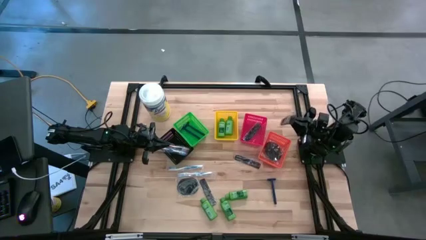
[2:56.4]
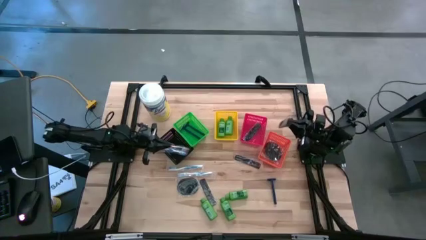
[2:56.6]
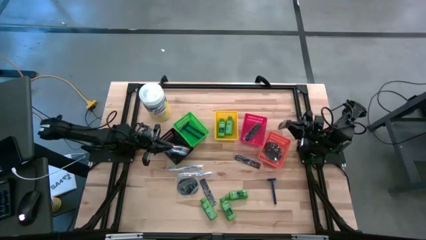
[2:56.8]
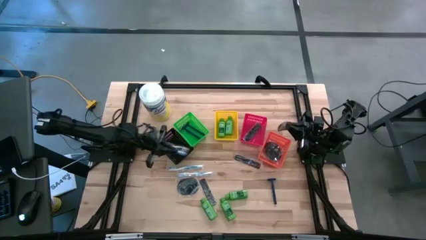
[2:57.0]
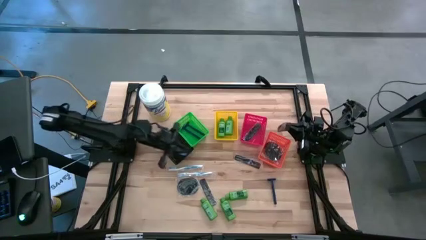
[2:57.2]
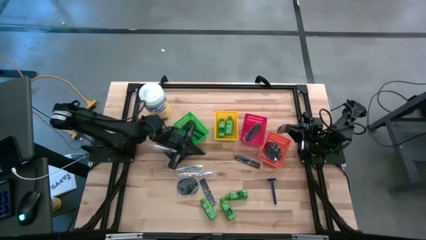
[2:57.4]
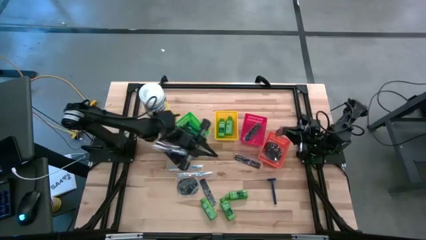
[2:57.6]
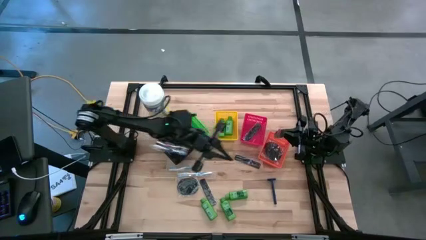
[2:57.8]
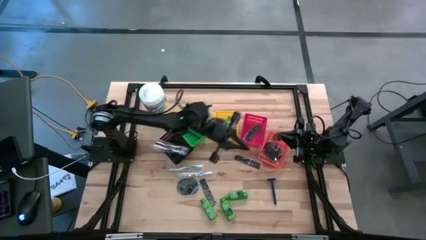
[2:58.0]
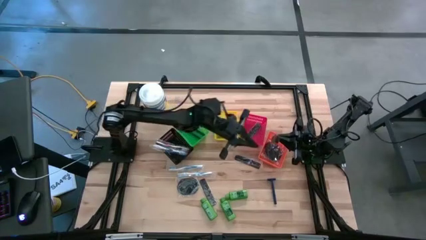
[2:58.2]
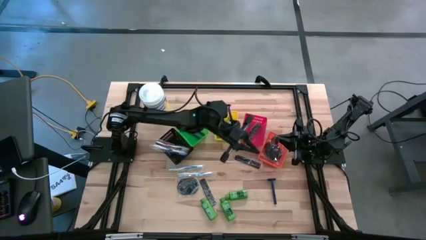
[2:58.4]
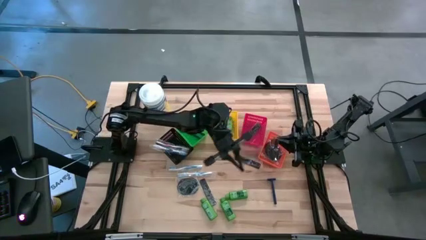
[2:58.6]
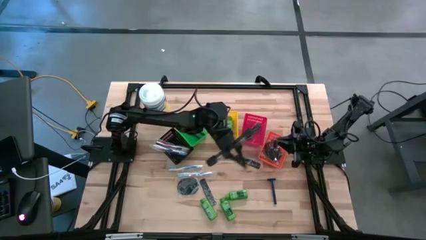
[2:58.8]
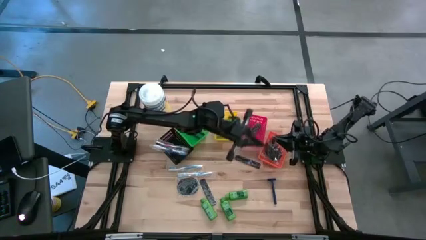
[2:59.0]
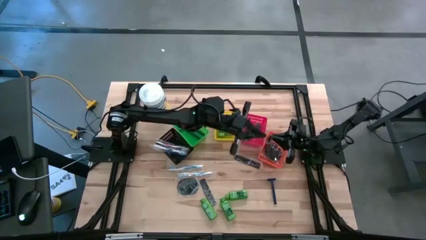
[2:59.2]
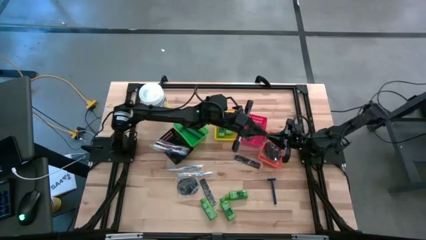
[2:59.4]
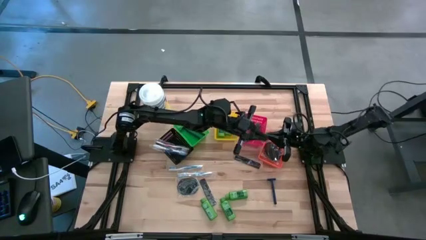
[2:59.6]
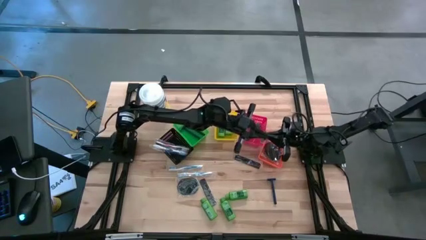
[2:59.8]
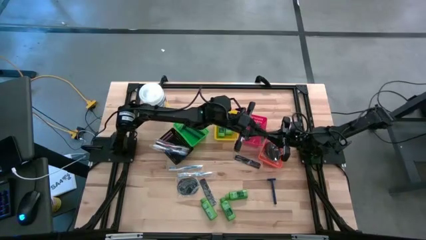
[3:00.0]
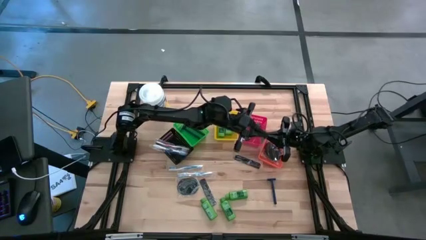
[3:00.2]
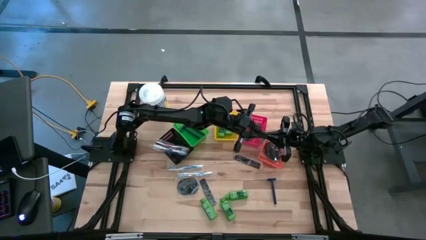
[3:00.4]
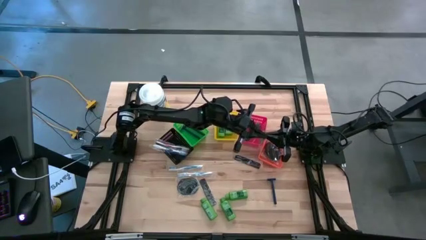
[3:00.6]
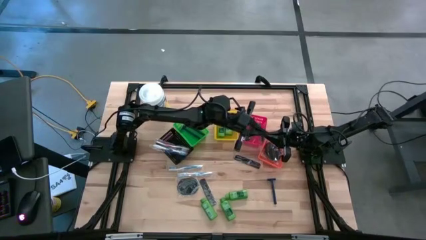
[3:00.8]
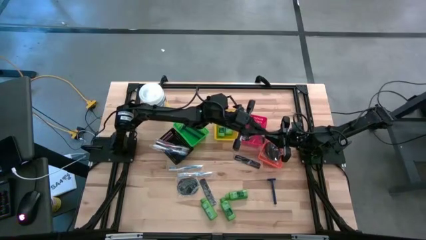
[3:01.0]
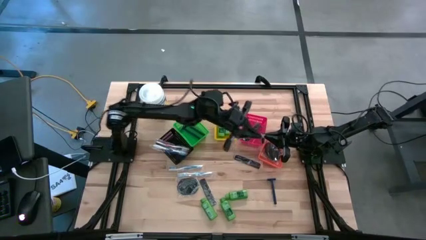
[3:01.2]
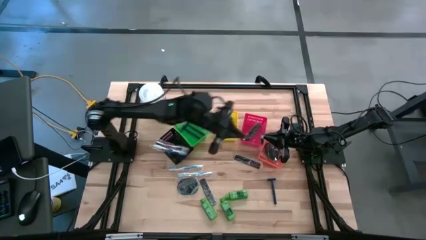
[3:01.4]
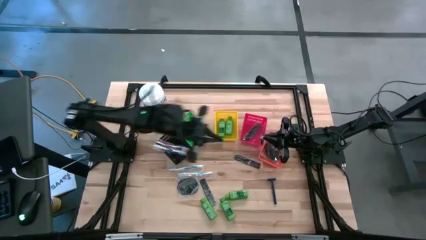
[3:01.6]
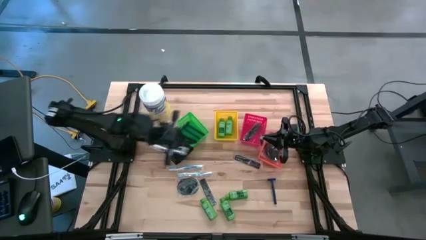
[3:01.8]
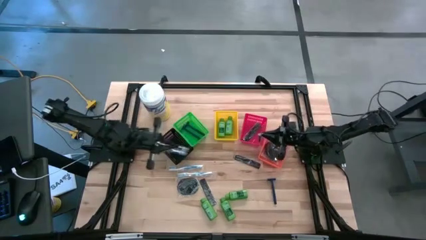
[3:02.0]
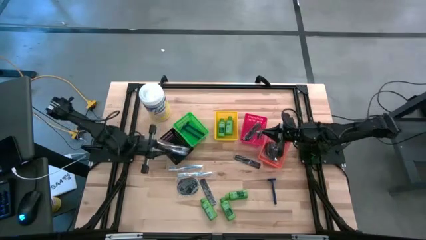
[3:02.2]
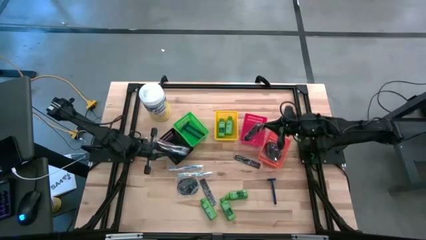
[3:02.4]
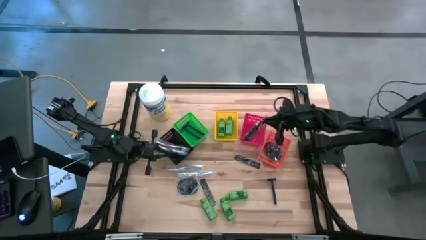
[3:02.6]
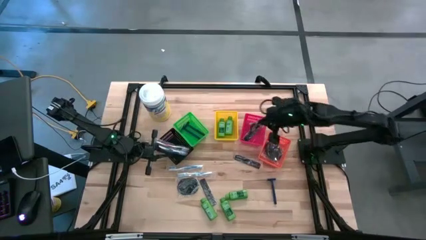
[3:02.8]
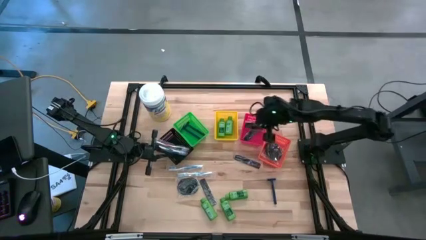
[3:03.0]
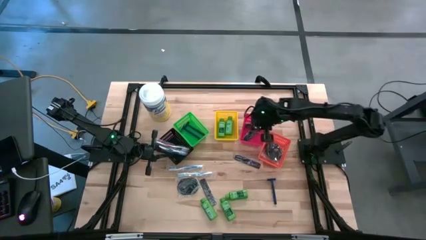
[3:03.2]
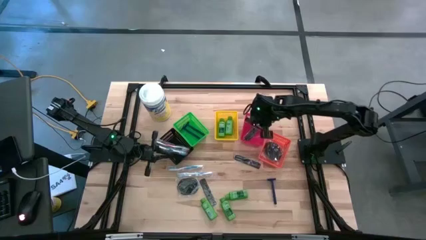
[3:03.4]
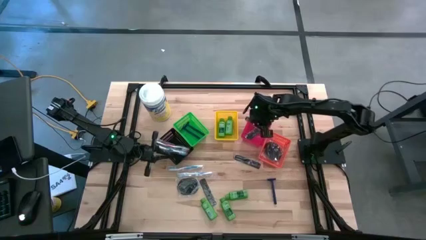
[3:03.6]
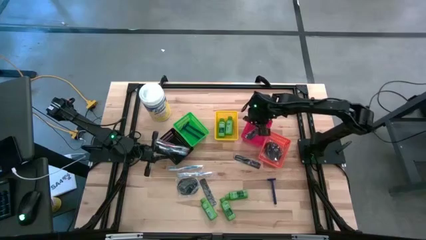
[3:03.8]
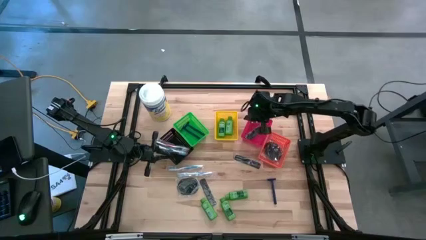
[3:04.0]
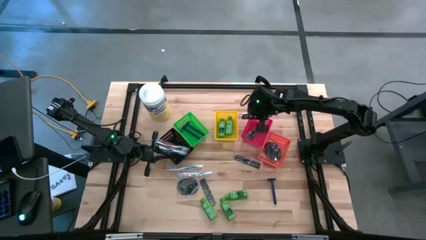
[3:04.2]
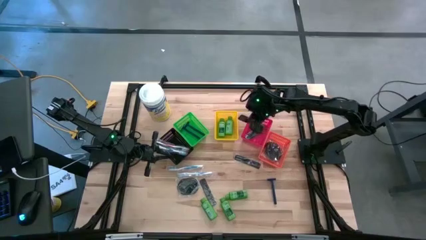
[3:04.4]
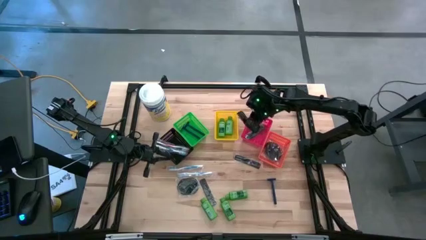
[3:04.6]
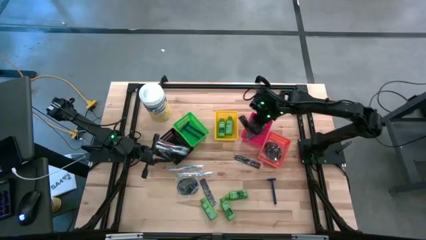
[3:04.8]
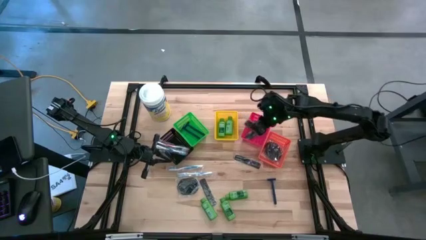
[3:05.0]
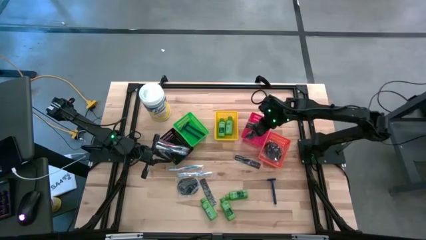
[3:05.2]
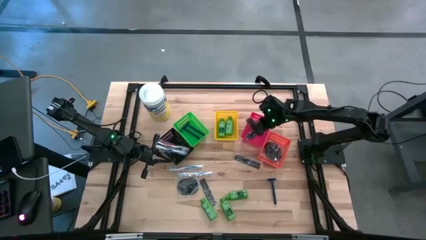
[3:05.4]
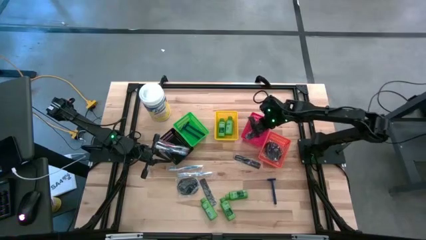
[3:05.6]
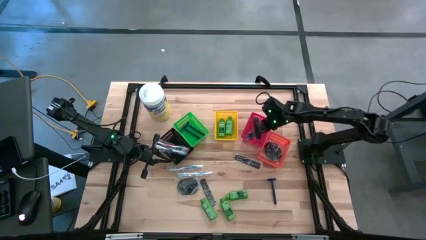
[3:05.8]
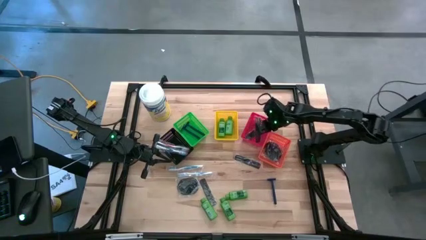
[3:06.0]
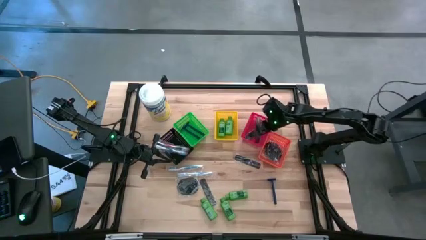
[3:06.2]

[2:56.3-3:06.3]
Task: Pick & Place Travel size toiletries
Put the bottom black hair comb into the red bin

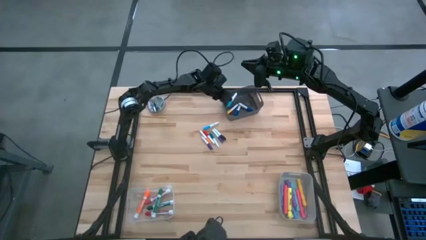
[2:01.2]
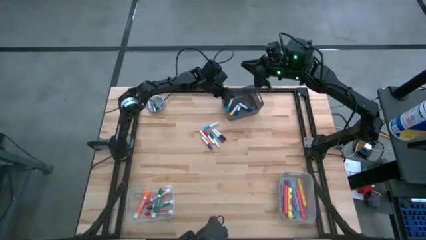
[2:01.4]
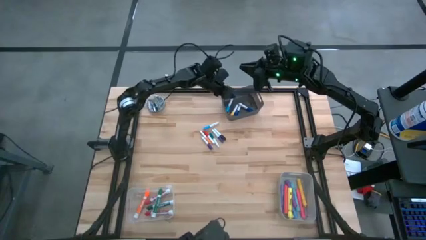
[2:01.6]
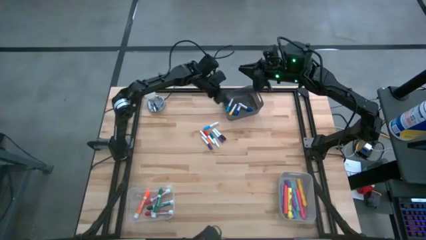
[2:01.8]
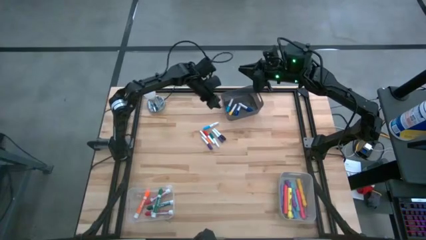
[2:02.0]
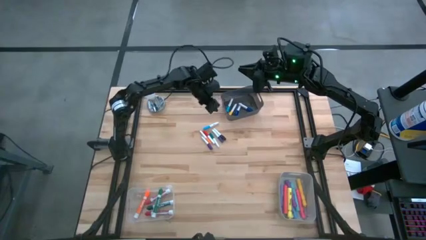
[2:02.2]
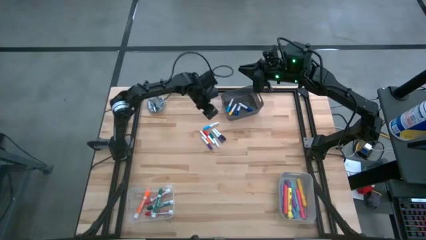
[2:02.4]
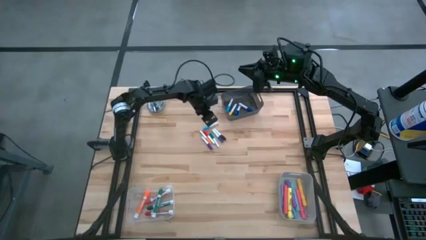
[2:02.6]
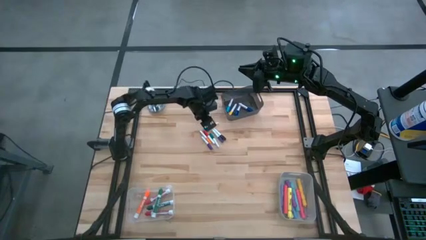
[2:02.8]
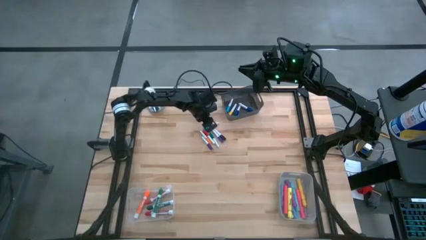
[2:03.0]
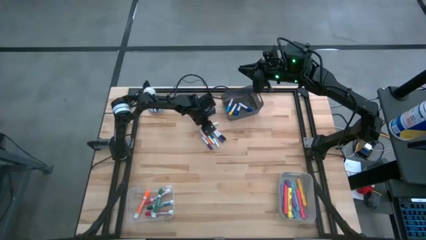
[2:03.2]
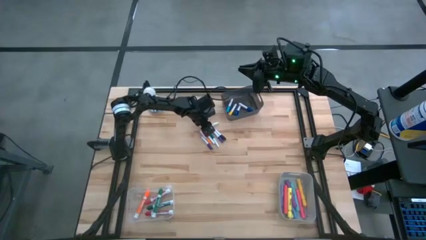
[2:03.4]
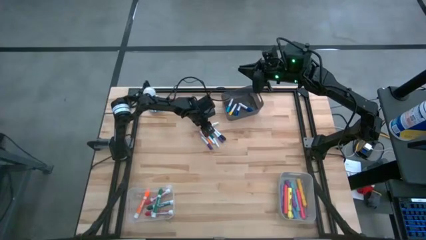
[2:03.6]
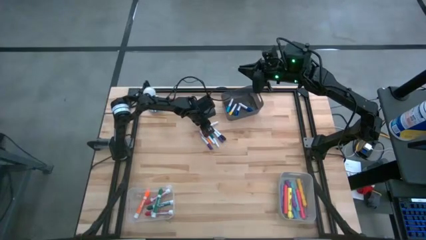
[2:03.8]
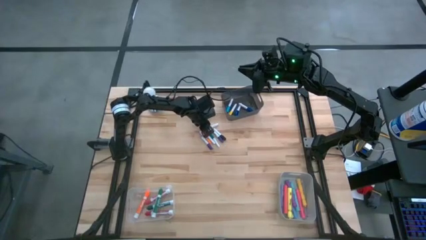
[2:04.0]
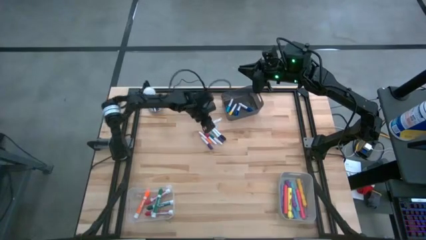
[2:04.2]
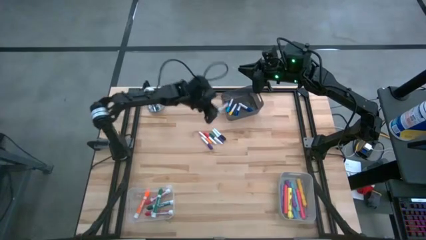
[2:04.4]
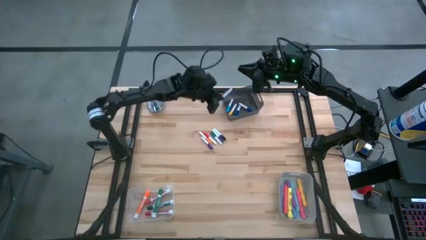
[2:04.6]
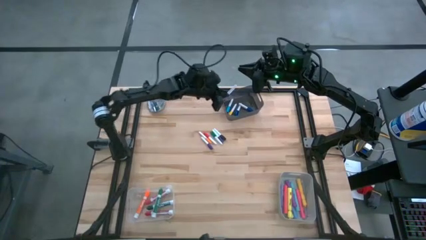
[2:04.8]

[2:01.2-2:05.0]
Task: Pick & Place Markers
Put the small light blue highlighter pen into the black bin

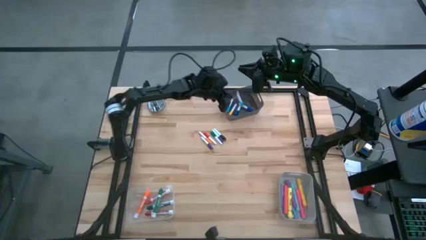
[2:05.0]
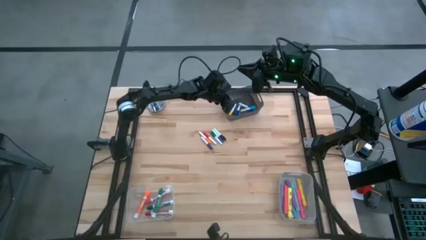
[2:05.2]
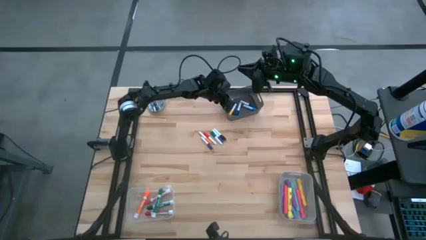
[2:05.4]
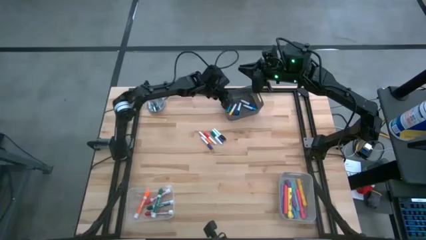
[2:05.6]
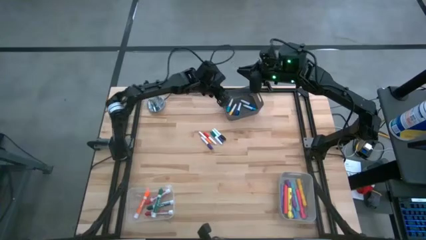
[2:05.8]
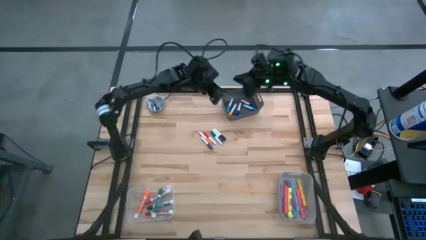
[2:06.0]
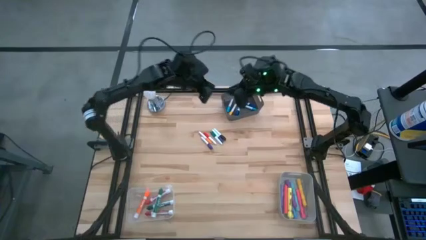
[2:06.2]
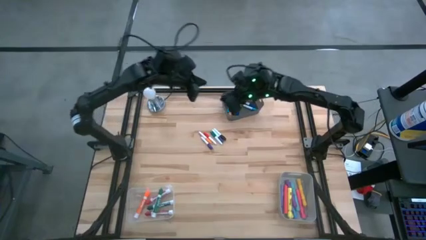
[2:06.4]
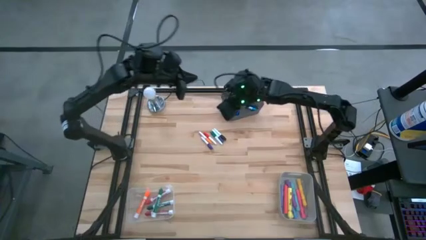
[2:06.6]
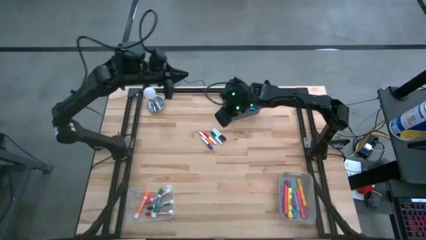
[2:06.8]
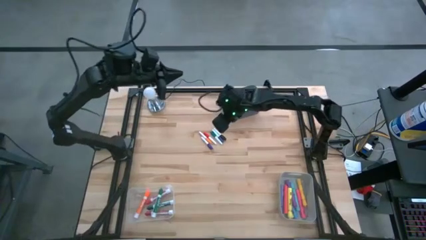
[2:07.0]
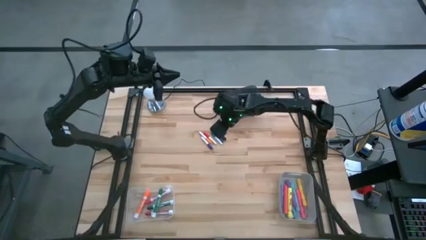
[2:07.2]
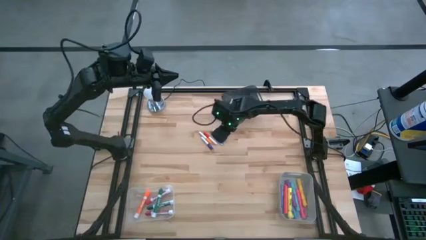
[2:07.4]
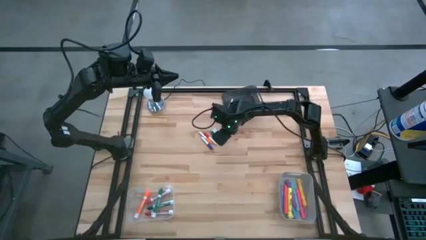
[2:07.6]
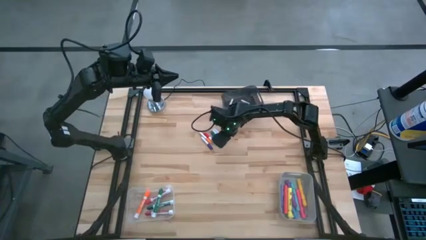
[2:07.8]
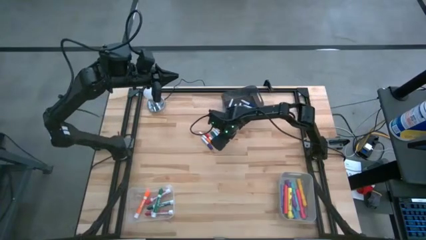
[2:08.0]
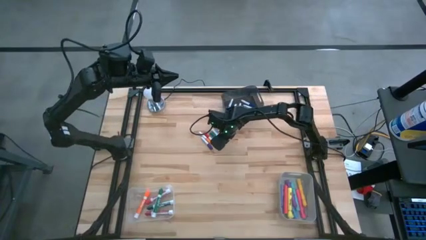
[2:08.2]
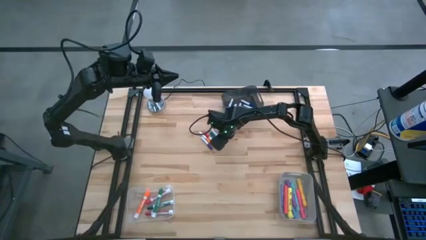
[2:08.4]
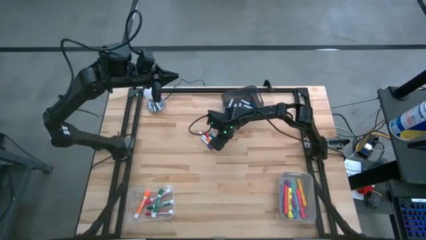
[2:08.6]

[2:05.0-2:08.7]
Put the small purple highlighter pen into the black bin
